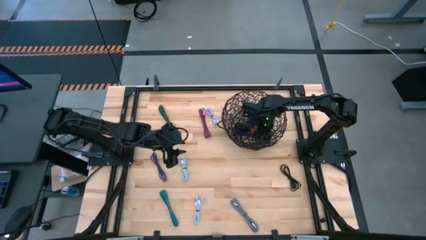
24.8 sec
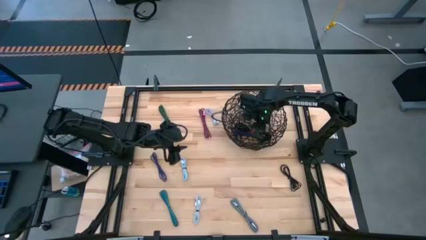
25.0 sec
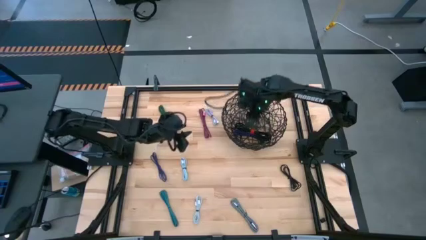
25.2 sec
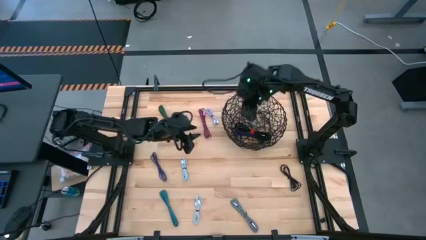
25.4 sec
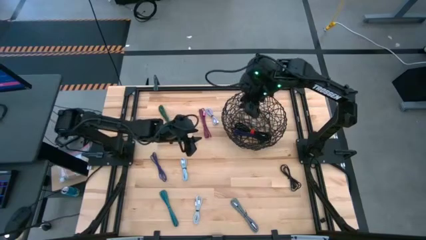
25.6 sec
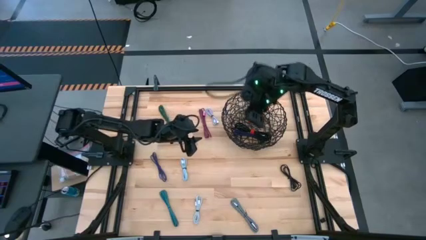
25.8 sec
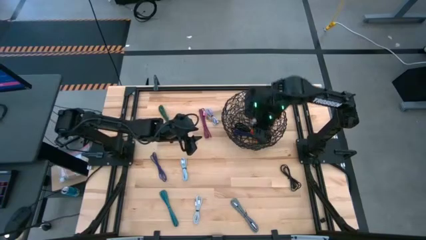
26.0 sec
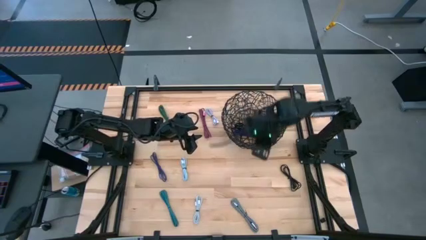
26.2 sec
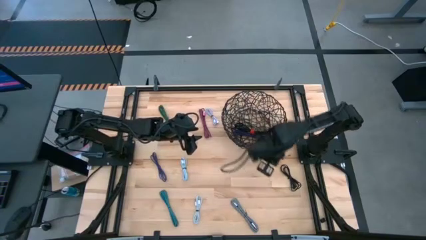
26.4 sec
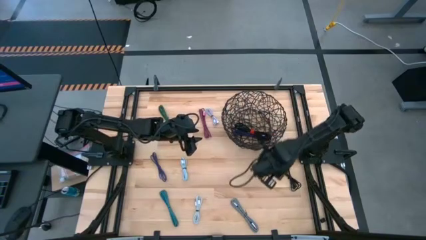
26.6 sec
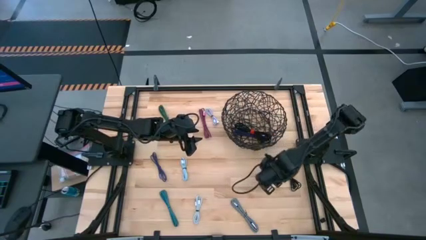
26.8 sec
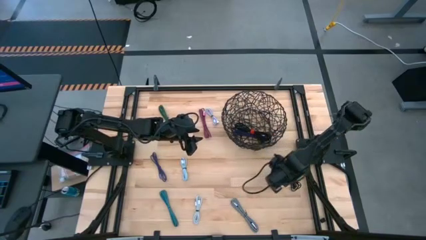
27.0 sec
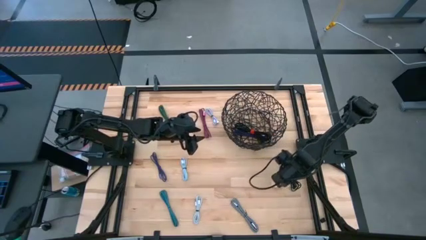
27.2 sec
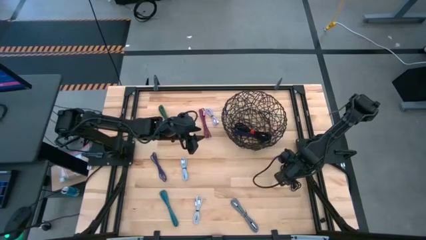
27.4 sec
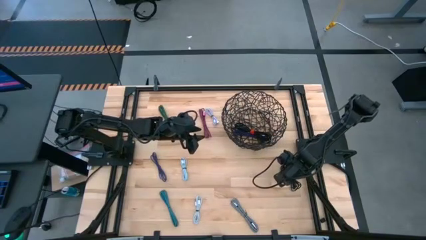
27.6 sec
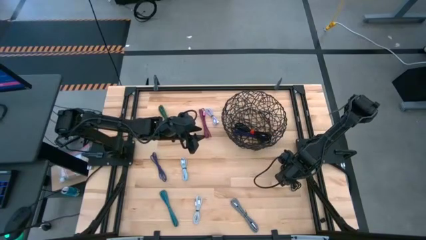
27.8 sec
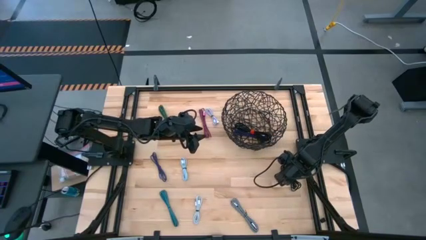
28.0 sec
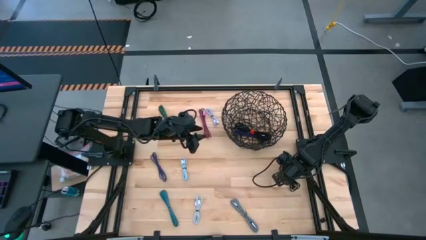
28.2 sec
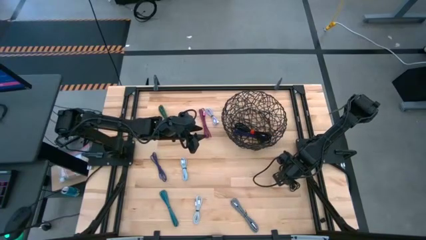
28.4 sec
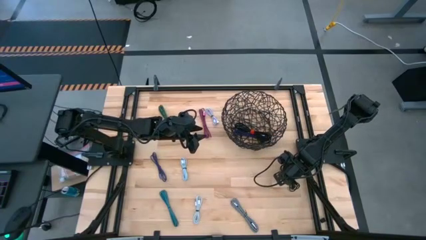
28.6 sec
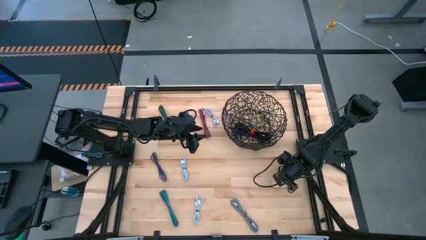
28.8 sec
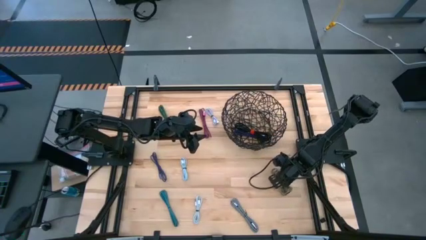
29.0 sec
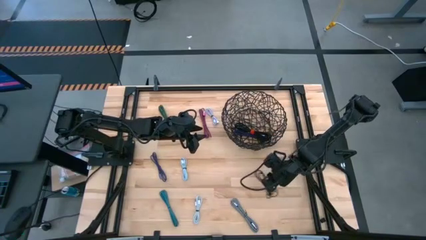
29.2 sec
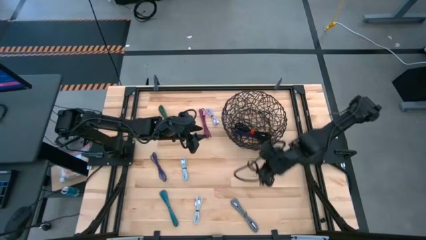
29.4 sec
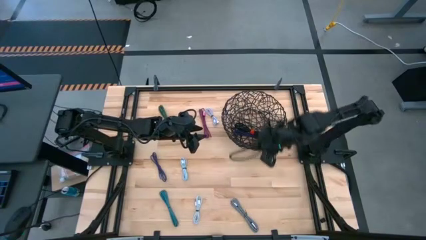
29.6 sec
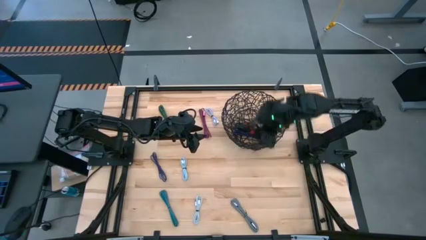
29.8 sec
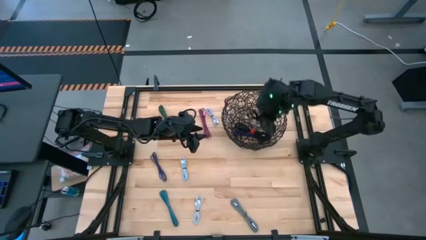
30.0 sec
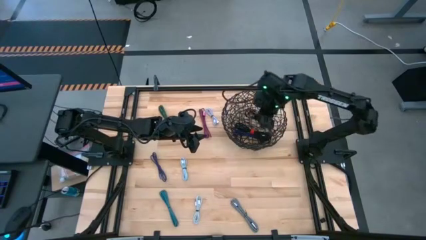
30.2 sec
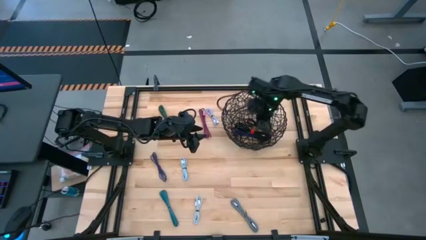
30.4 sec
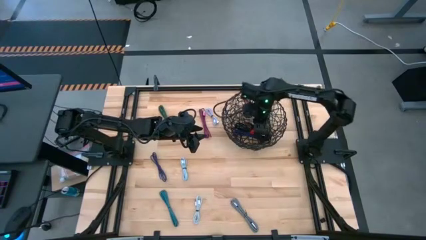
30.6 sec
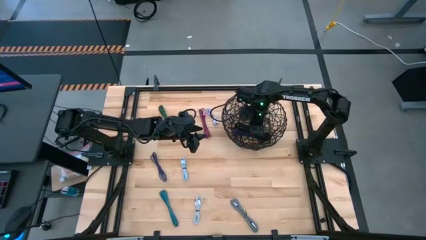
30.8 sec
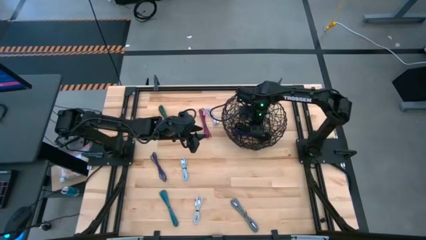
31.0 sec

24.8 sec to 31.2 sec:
Task: Pick and place USB-C Cables
Put the black charger cable into the black wire basket

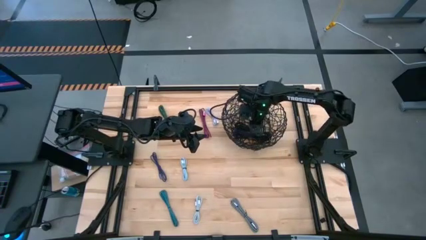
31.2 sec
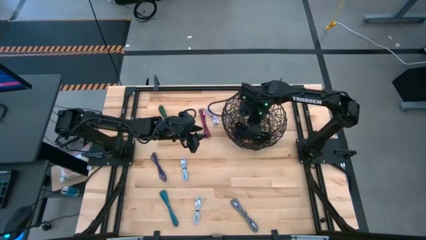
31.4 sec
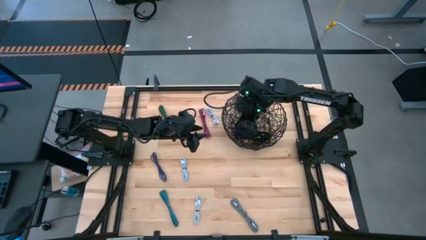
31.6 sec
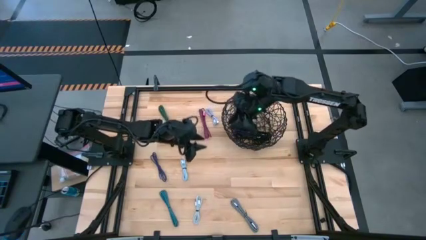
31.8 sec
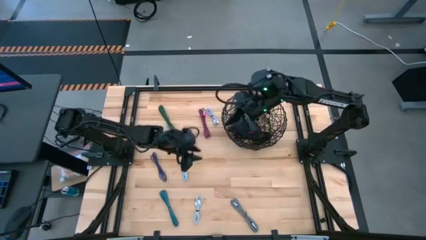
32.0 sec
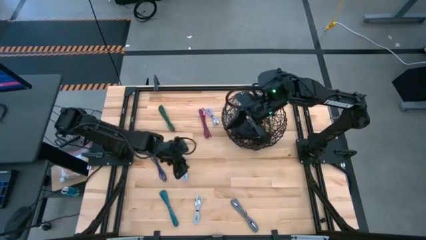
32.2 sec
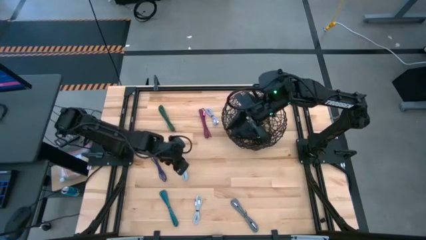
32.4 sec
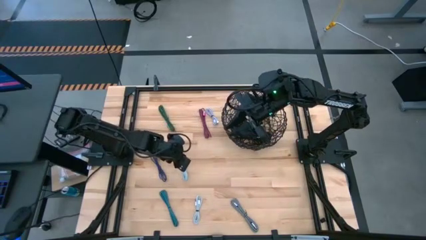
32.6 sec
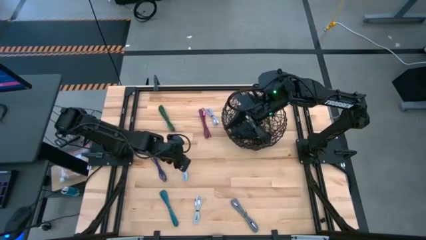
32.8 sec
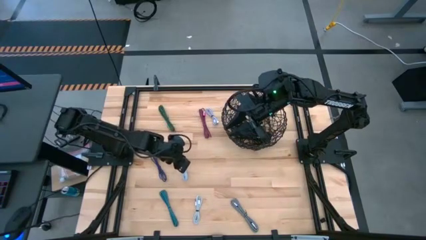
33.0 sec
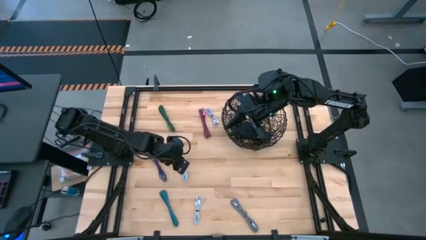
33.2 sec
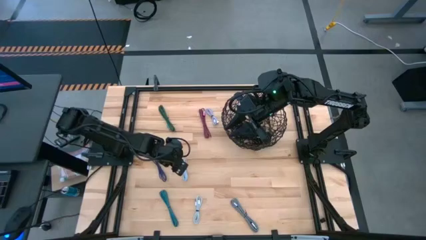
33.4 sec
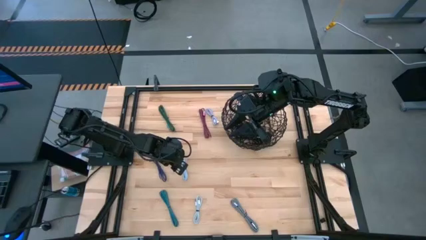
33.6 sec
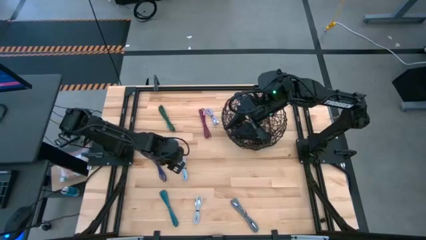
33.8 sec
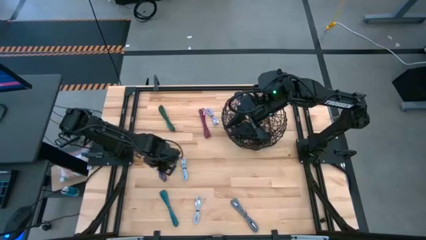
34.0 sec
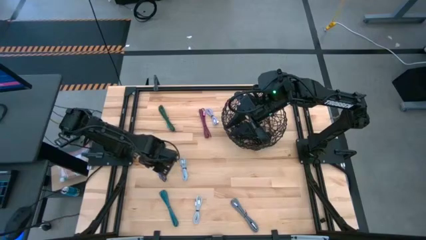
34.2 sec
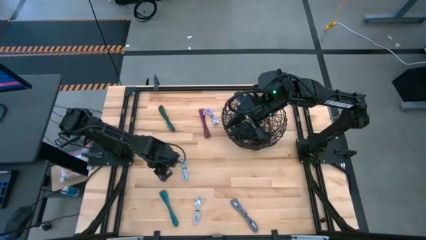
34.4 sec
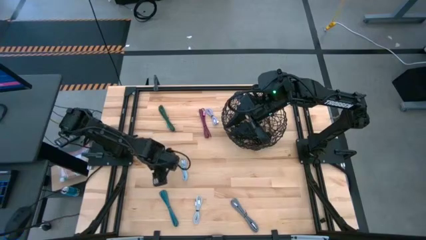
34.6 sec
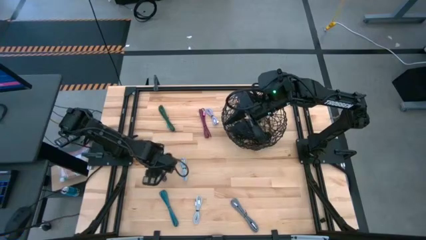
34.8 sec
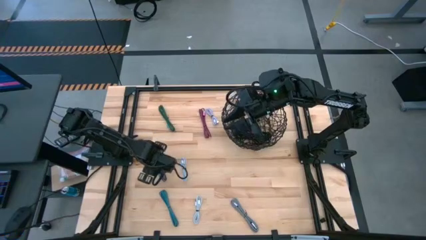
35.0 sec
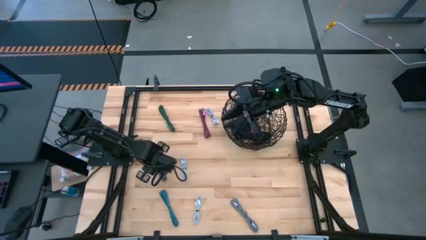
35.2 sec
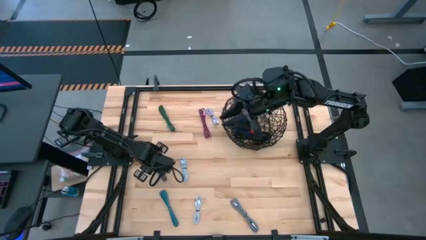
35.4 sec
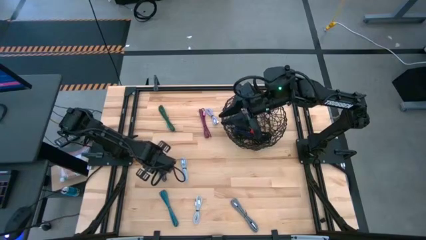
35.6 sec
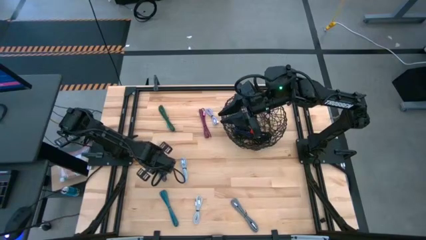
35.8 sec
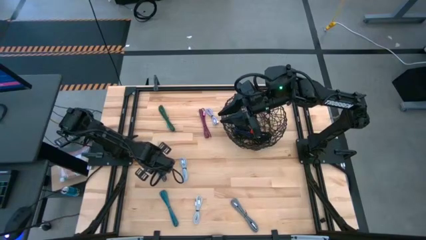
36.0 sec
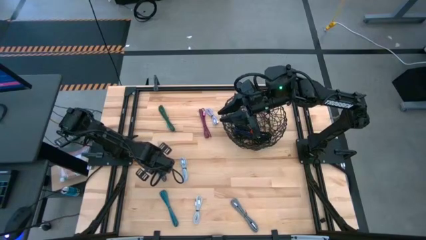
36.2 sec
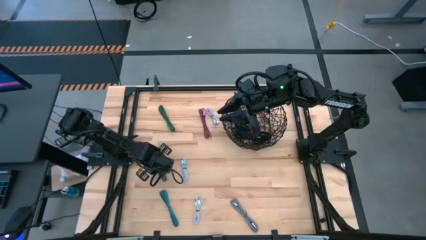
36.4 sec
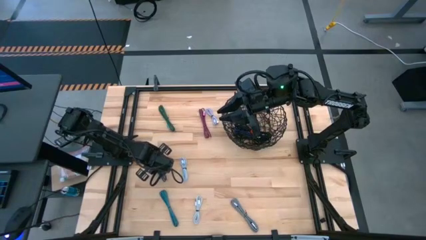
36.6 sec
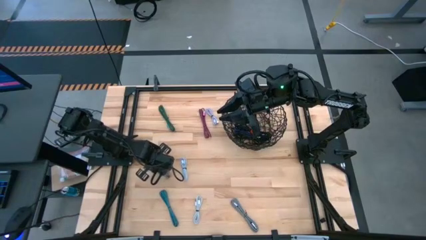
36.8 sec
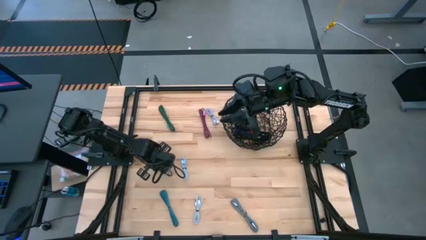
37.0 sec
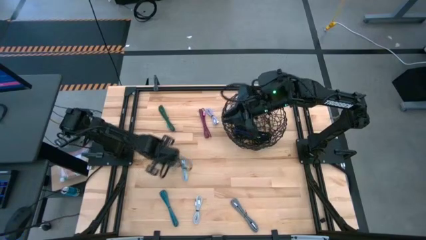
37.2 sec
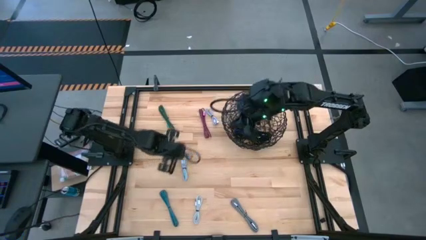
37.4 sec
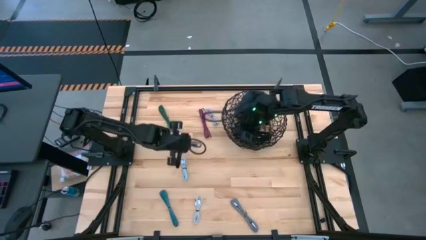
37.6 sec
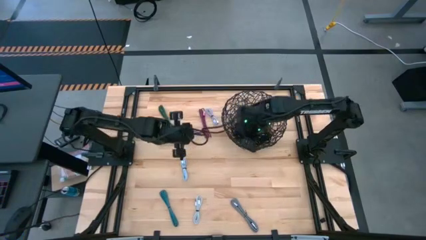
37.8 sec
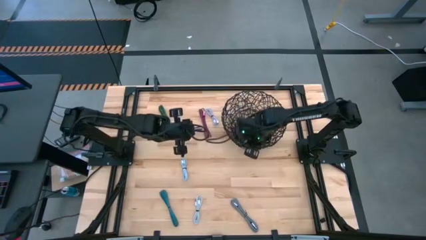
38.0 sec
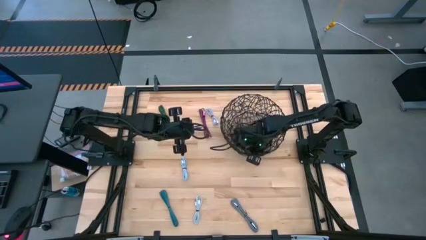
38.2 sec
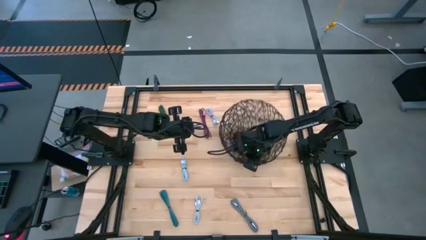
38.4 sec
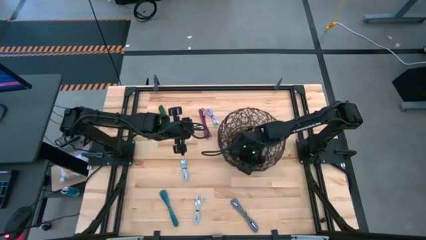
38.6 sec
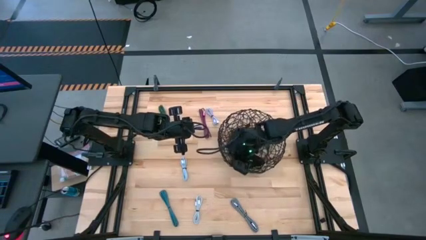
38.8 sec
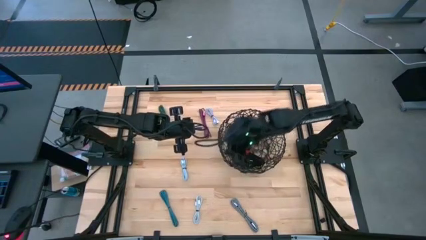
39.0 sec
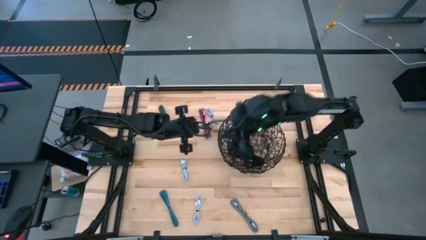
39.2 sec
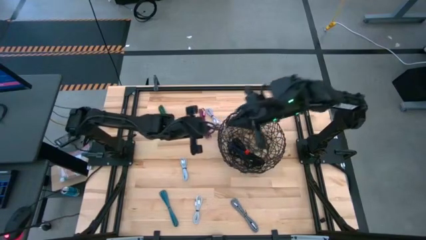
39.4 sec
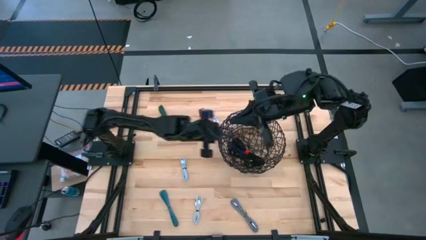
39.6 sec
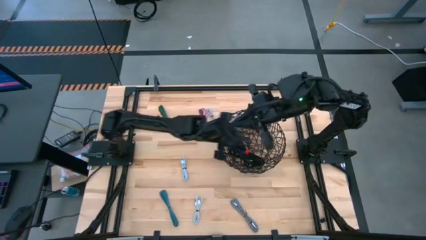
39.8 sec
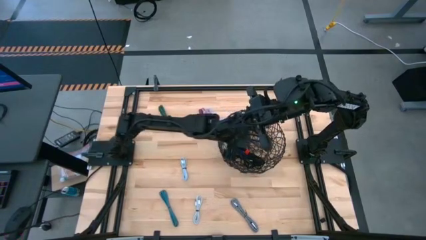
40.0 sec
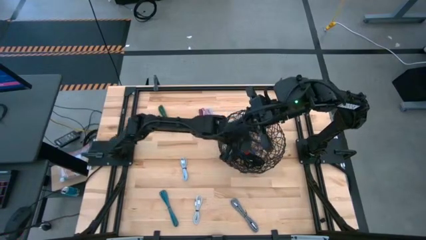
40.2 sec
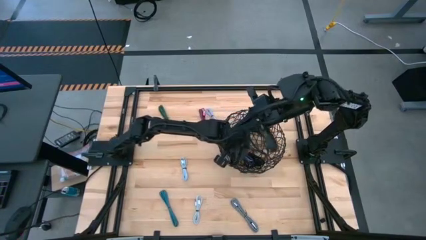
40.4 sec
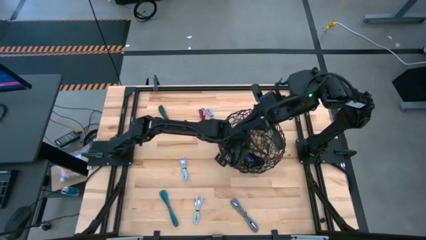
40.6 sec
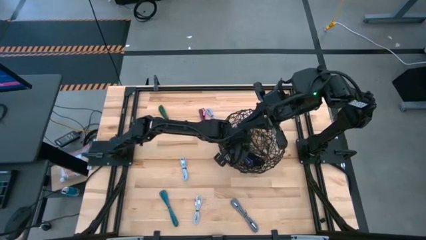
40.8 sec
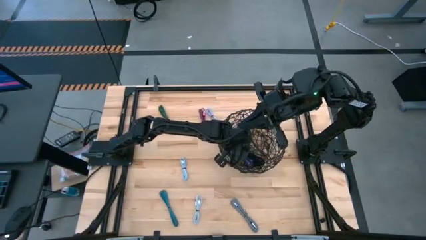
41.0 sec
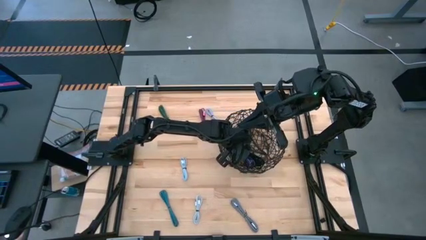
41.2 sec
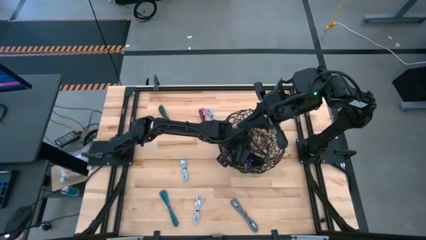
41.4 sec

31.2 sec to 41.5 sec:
Put the violet charger cable into the black wire basket
